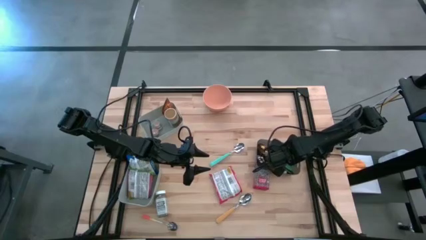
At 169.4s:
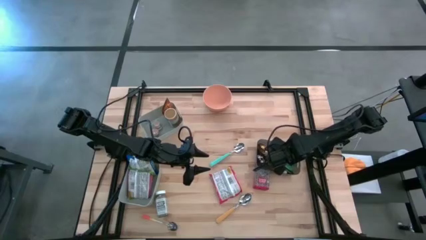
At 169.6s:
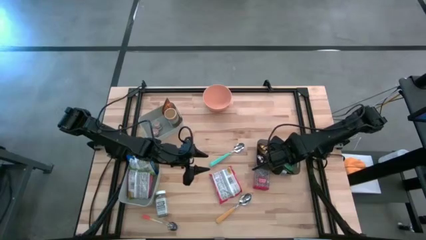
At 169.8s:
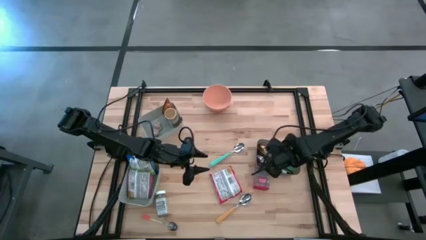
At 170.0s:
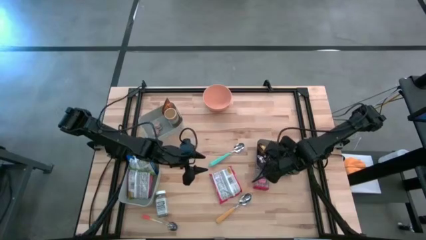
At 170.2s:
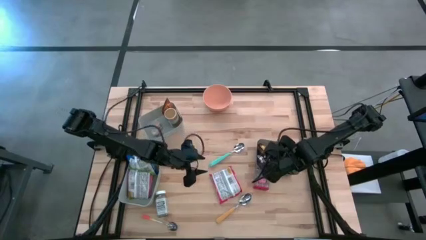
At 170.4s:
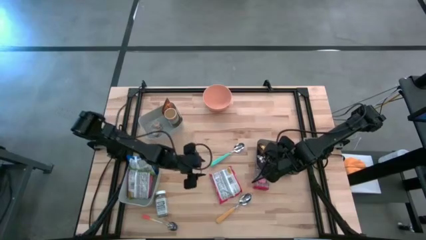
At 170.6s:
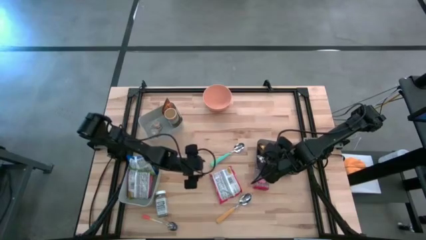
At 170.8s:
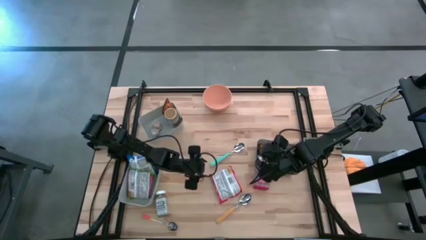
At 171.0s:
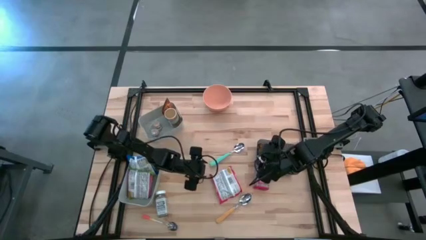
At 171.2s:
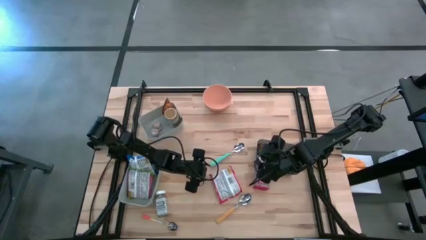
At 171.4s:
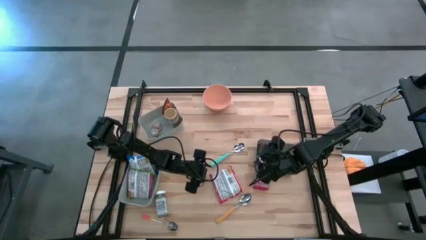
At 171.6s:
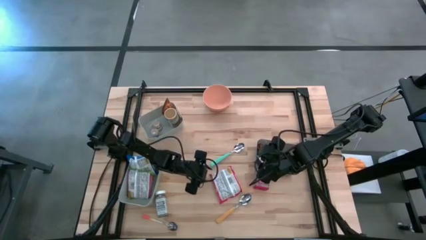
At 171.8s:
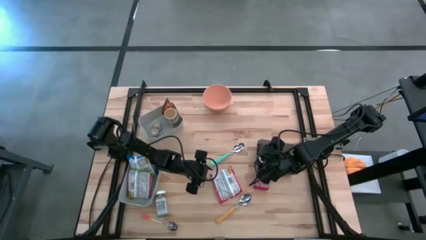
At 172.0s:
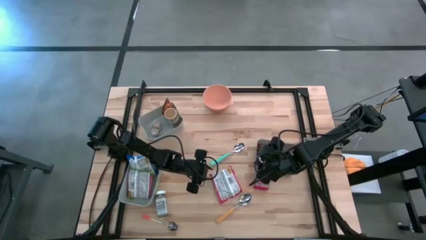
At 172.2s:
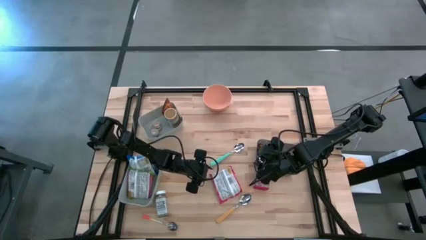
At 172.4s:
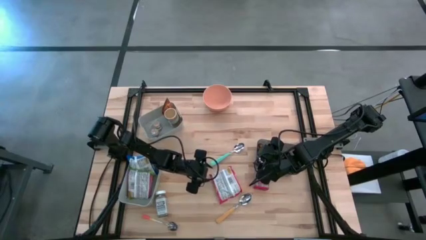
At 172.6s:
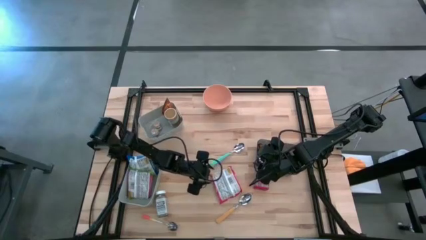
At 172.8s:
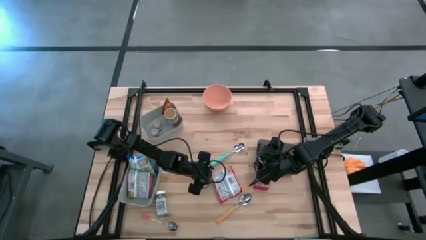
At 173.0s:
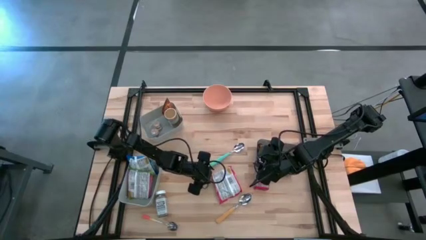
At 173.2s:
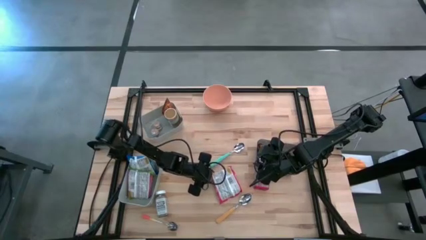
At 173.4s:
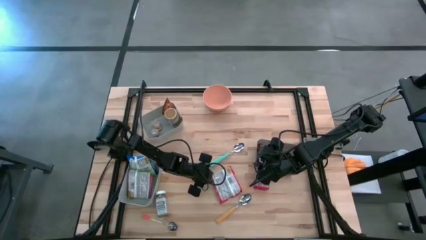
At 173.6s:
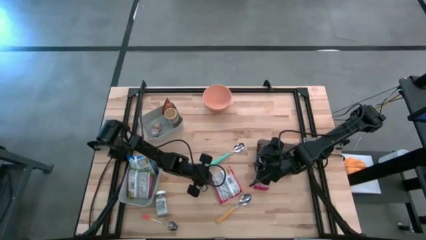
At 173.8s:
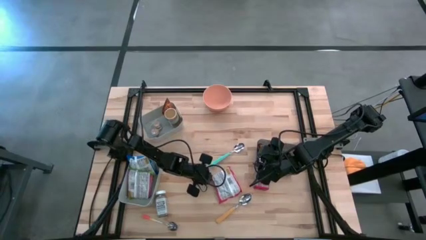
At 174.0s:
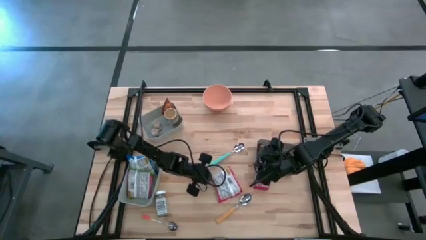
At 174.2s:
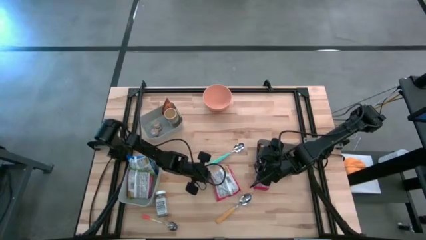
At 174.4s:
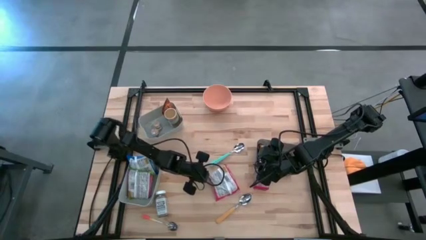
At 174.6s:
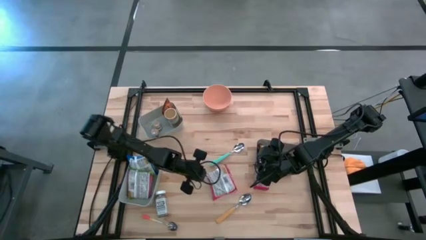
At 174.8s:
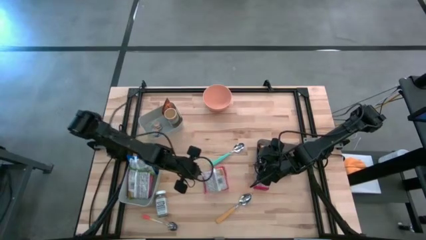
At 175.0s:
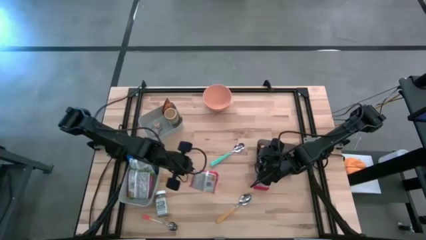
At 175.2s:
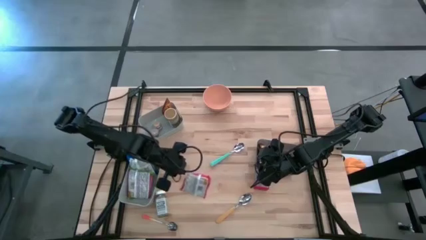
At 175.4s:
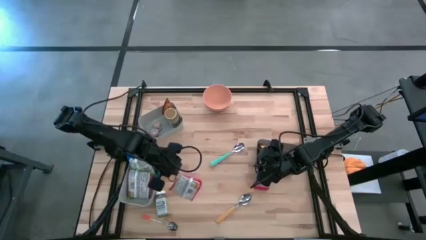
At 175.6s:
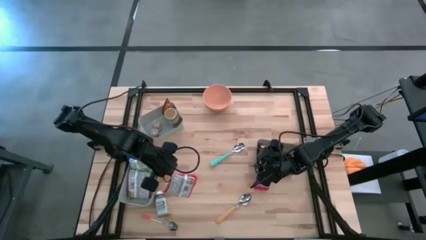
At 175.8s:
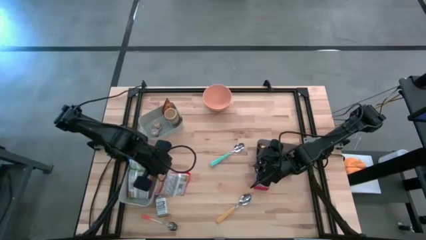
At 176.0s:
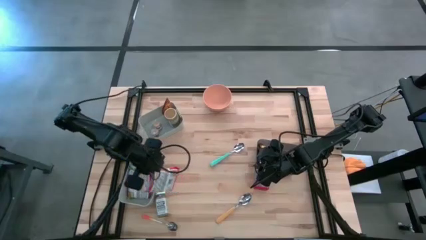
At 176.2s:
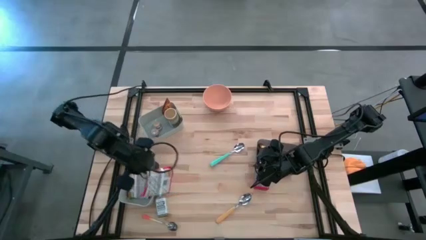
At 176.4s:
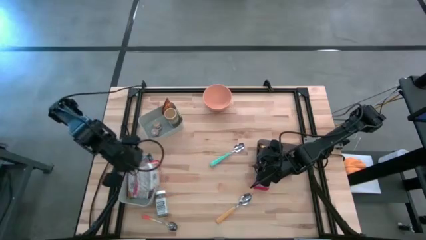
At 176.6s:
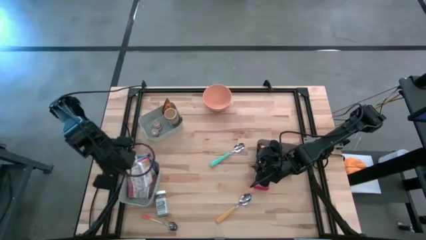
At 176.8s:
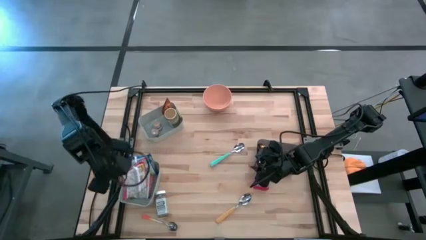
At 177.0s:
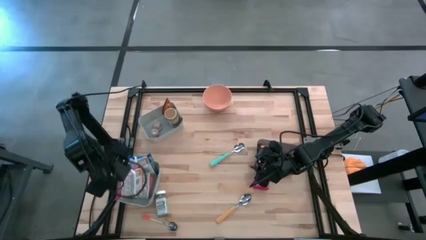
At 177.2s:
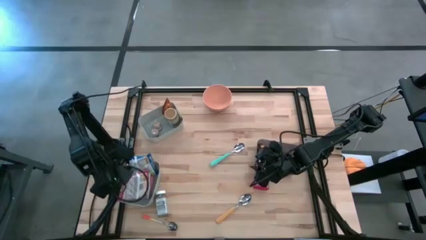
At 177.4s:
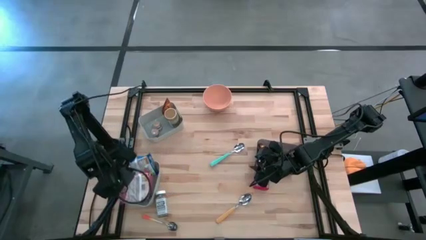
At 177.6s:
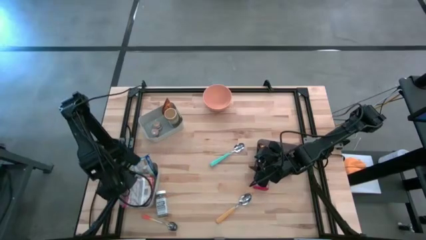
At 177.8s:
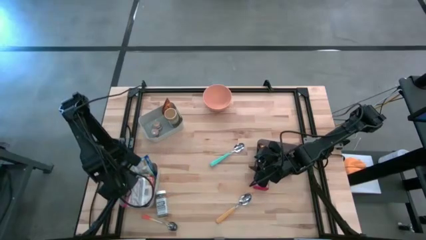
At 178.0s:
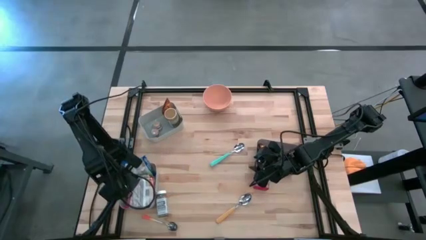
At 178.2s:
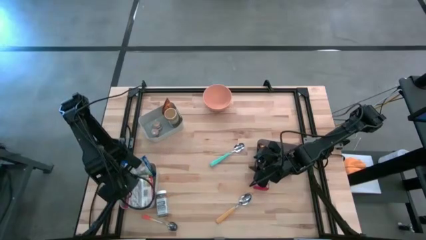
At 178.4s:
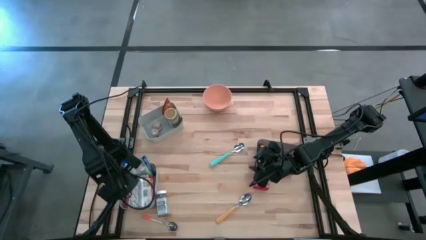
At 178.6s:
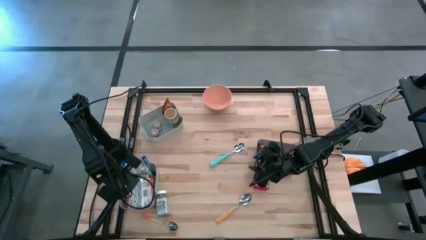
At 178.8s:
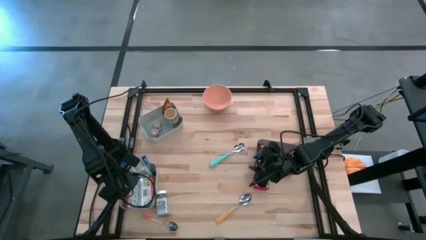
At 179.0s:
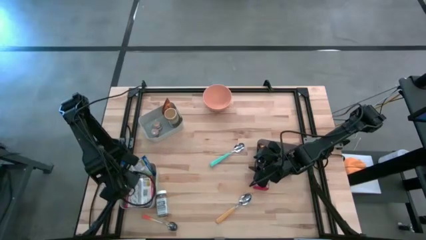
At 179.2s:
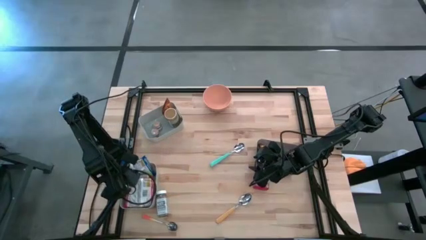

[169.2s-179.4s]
Put the pink noodle pack into the bottom gray bin

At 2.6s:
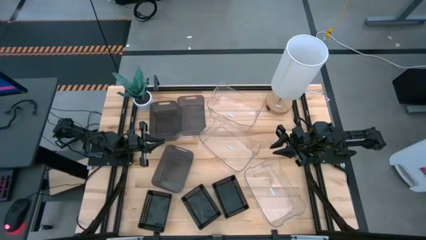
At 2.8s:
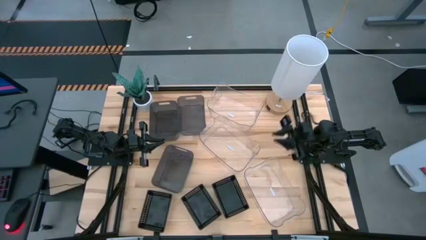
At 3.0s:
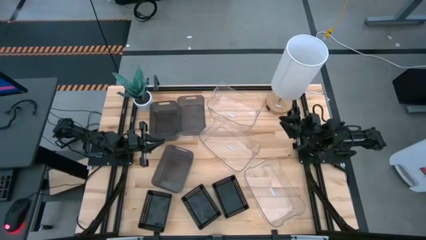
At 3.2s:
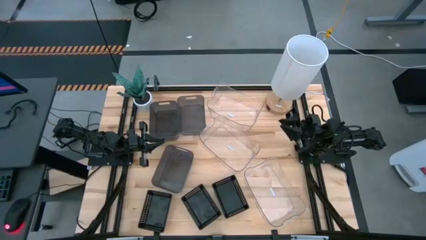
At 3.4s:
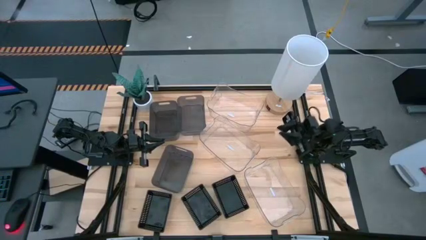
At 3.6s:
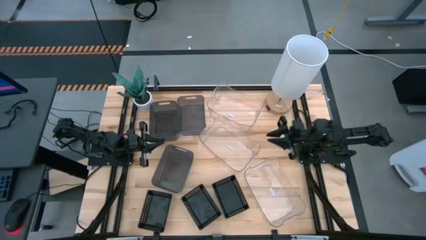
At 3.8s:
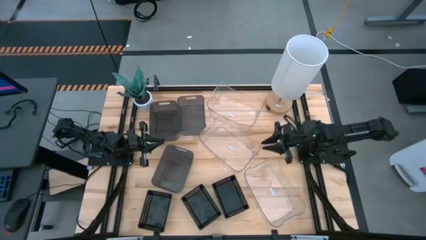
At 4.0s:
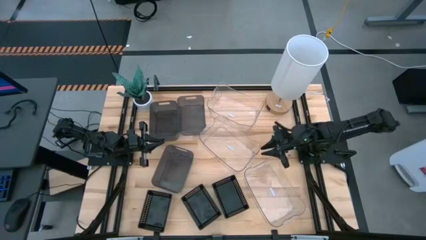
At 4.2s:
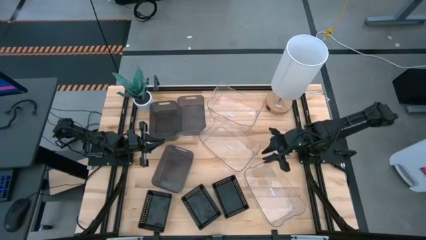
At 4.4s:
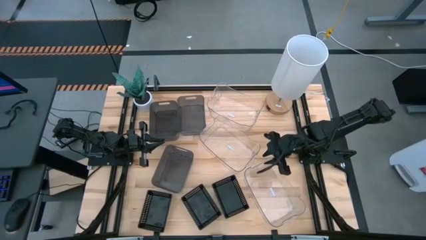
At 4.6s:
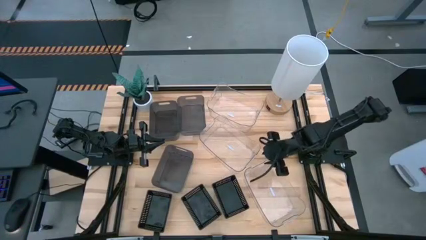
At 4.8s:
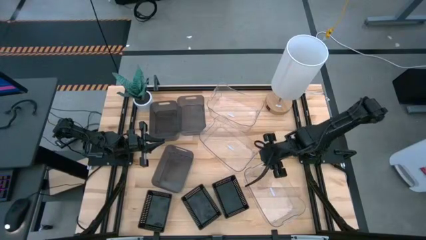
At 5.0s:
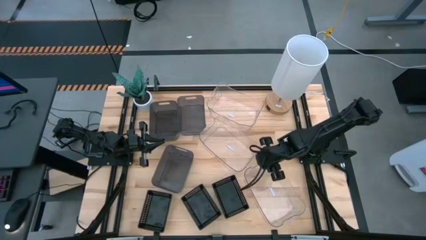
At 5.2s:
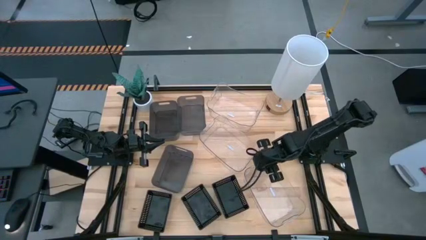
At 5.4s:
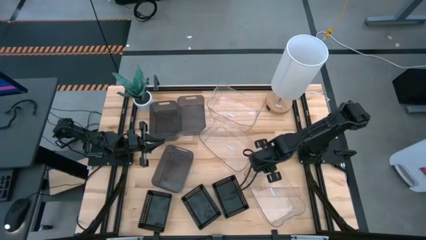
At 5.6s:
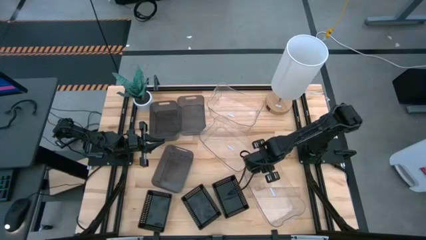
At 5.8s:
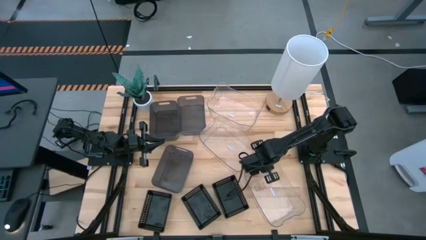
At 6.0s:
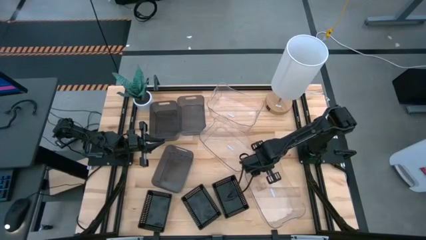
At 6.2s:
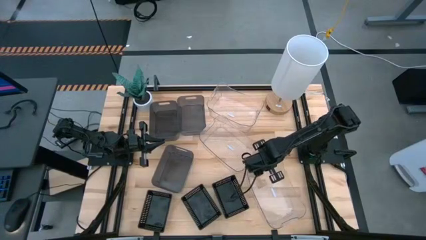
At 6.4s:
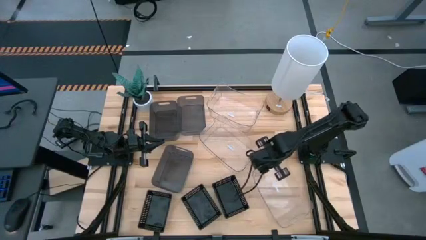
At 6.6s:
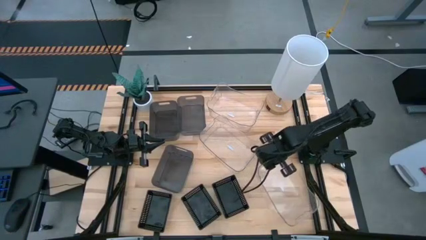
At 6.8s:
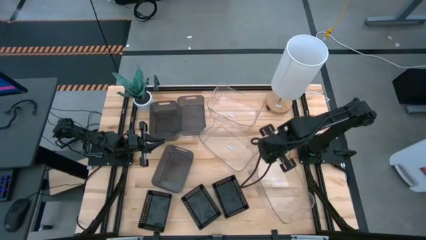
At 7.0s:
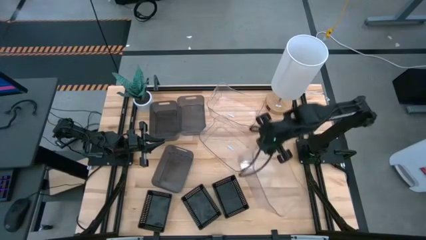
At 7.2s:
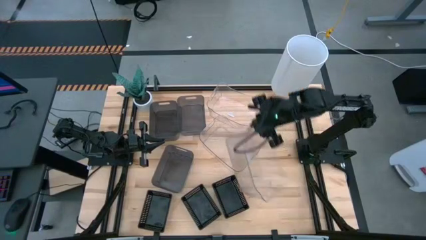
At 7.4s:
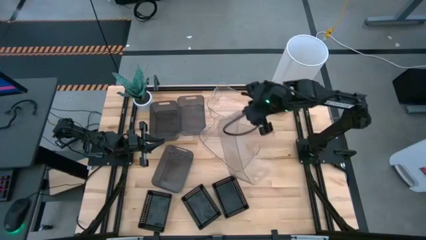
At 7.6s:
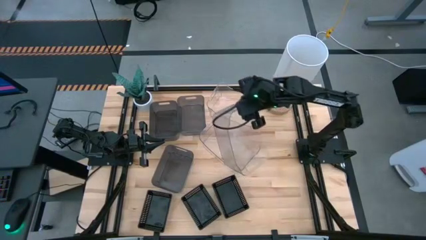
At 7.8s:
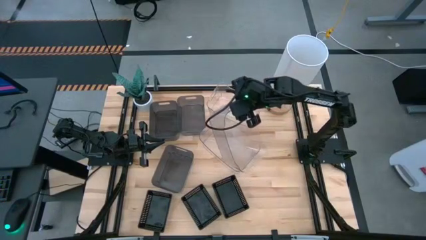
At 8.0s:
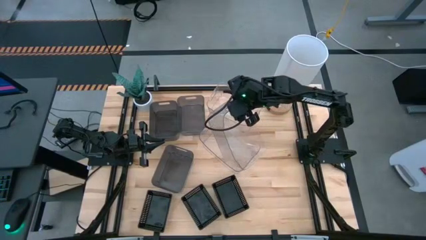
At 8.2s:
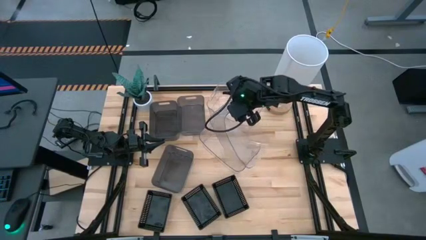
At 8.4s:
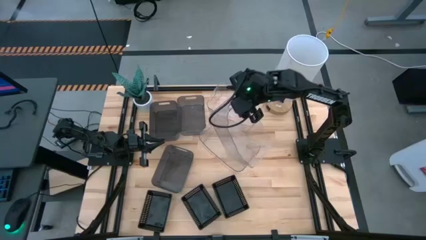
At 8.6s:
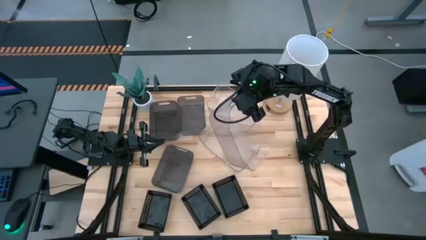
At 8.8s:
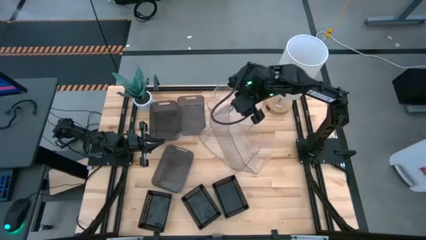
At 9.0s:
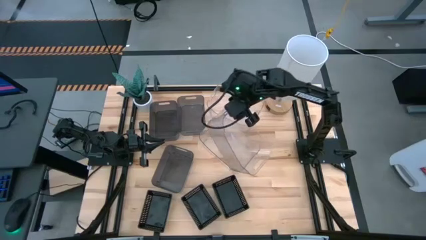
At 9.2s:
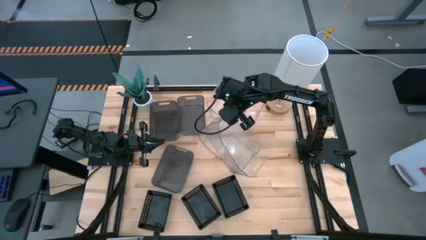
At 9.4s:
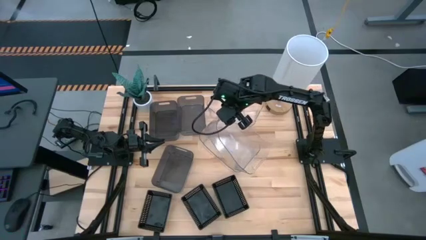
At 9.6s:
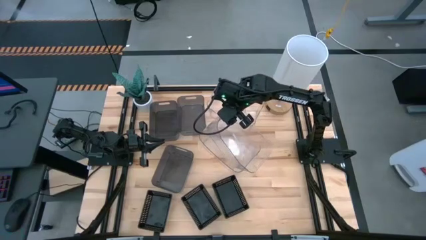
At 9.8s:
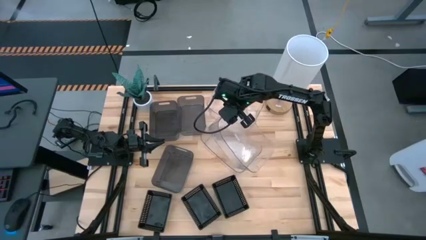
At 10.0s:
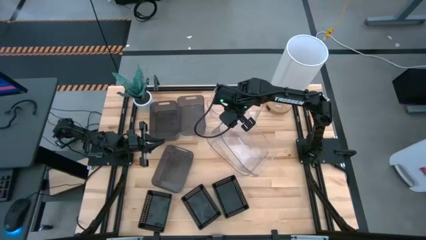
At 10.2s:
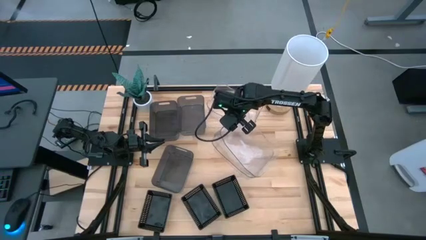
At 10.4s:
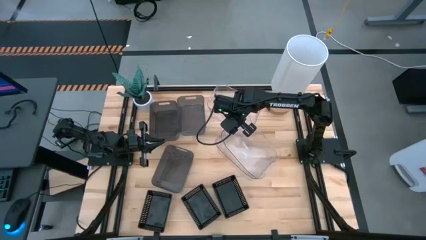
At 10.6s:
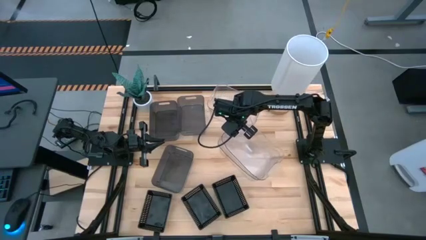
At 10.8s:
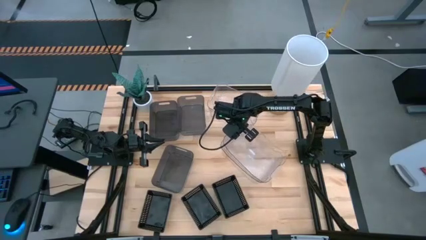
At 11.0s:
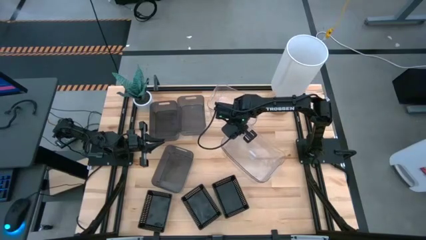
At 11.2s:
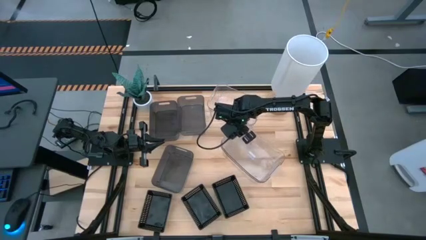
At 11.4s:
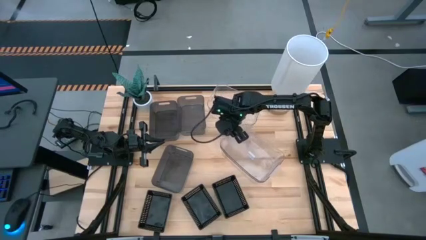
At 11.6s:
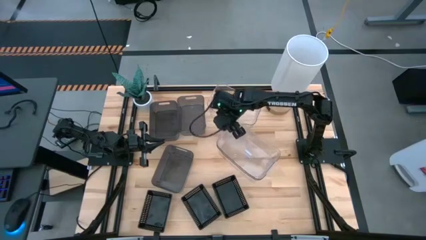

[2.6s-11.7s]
Stack the bottom transparent bin on the middle transparent bin
